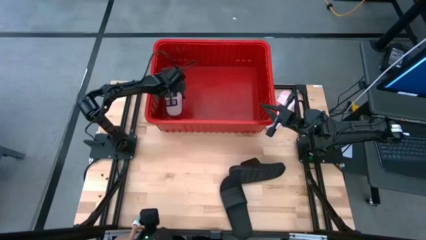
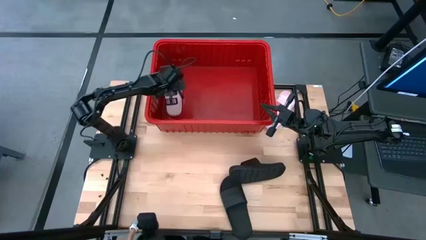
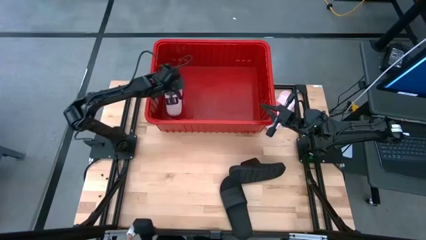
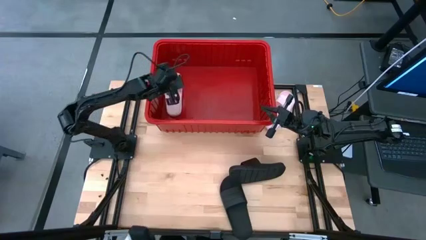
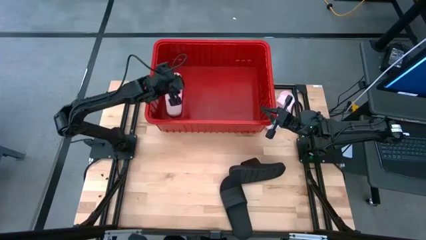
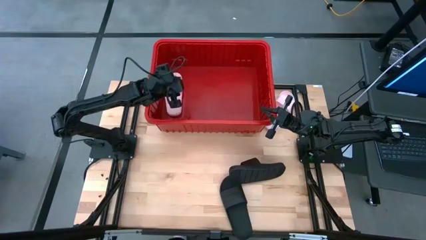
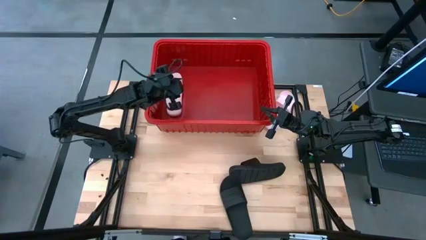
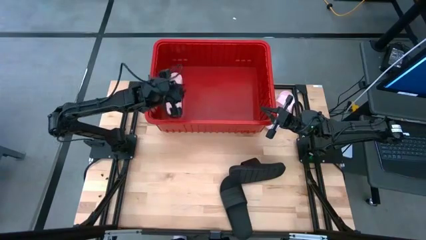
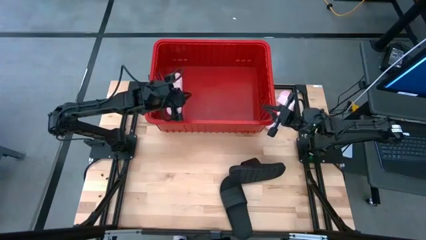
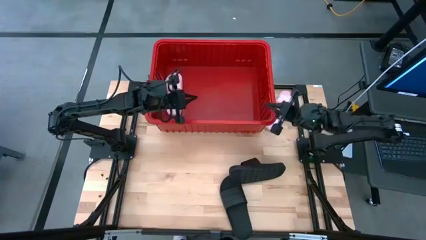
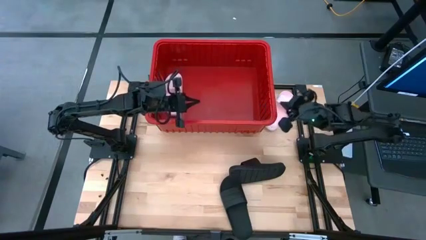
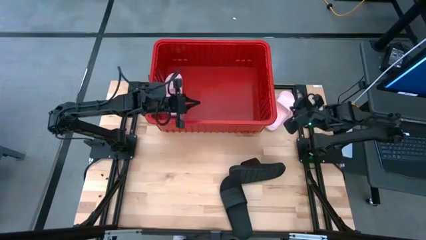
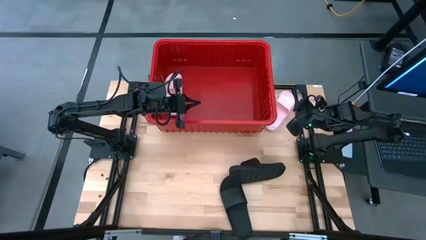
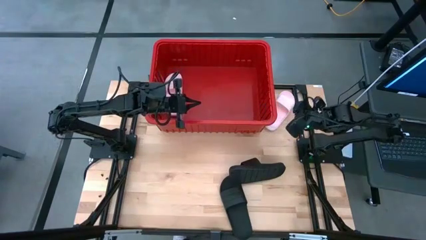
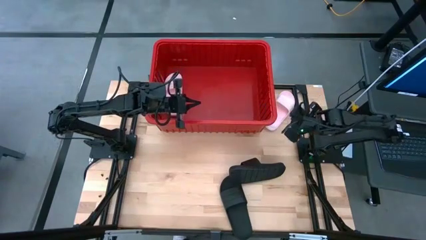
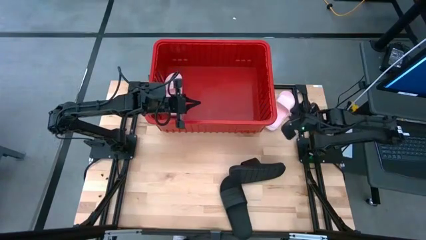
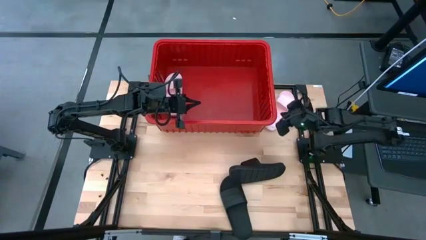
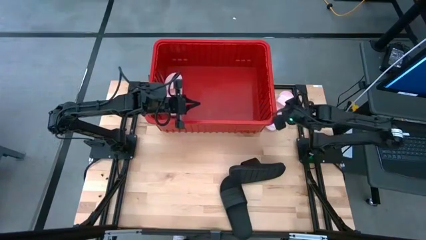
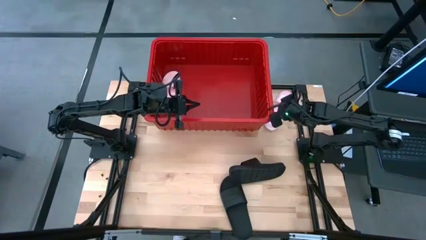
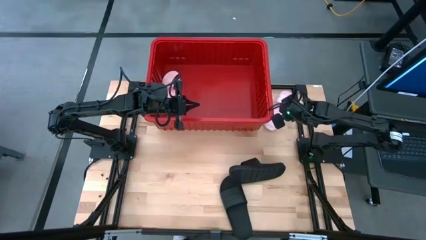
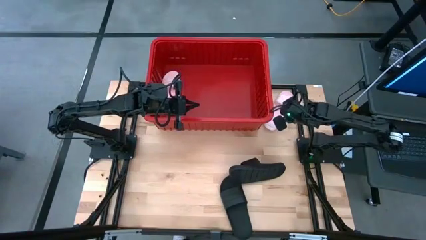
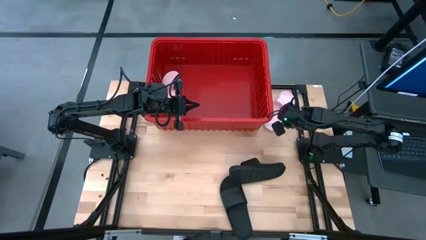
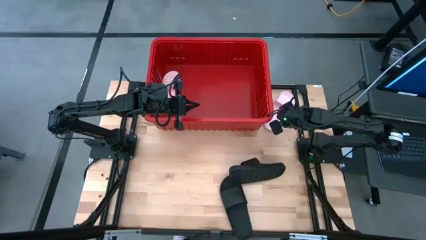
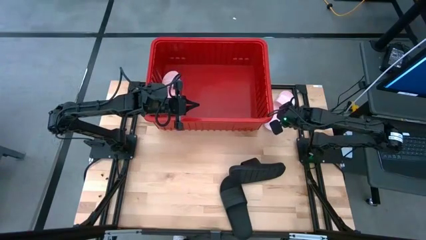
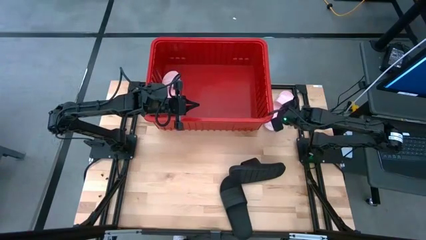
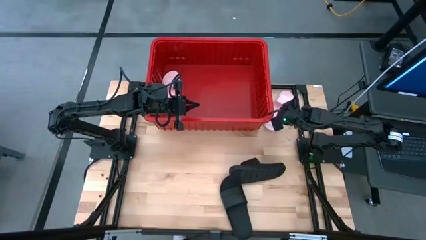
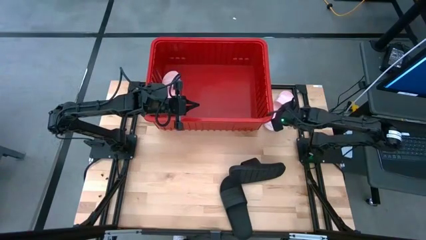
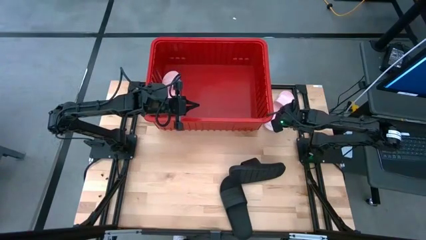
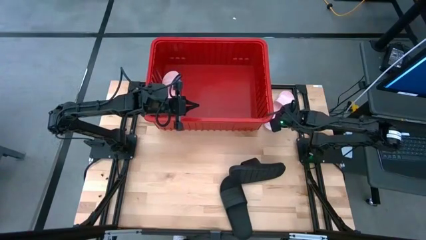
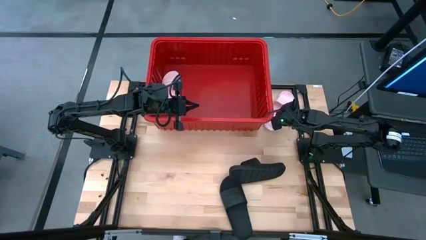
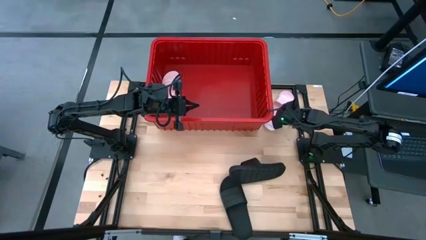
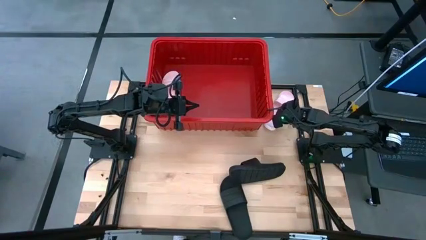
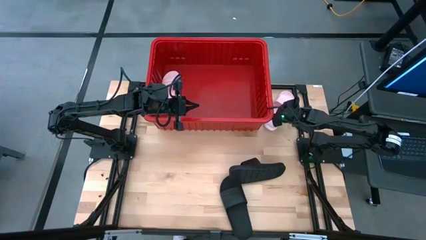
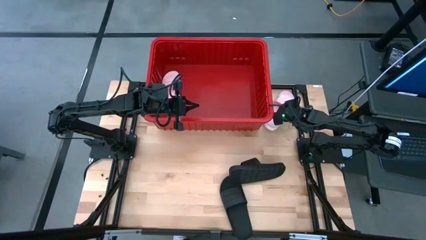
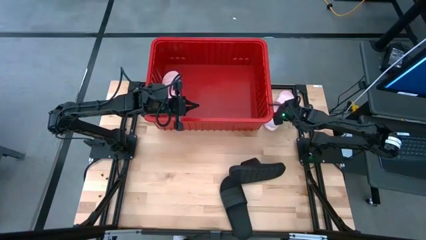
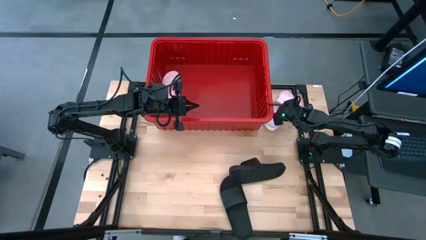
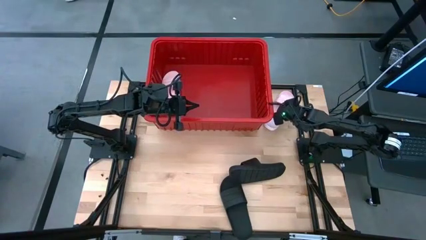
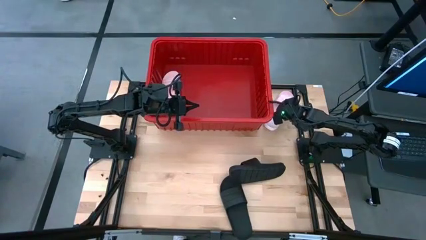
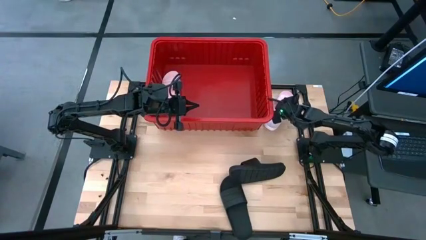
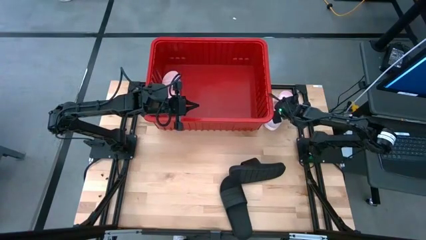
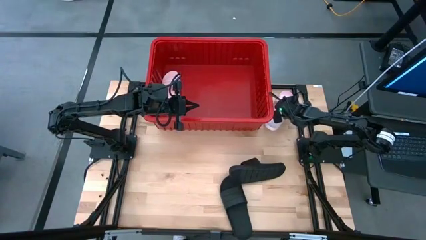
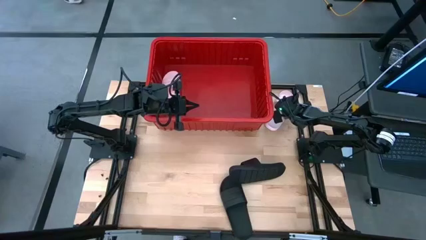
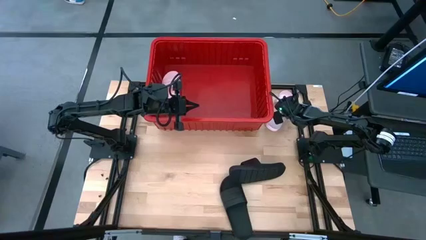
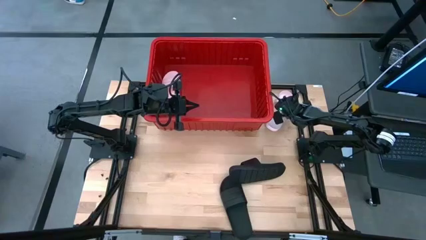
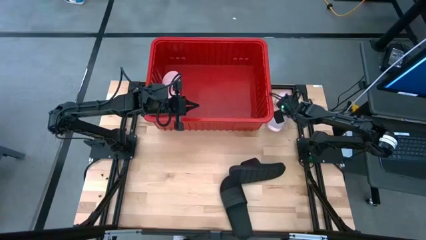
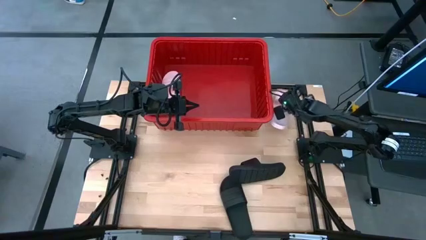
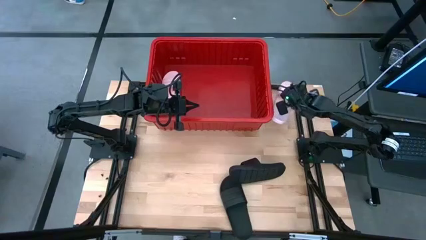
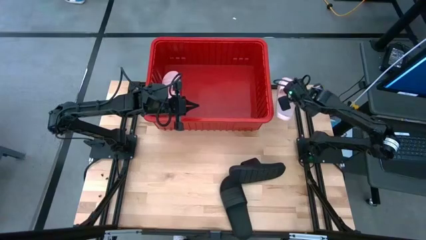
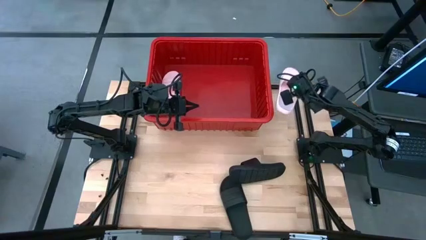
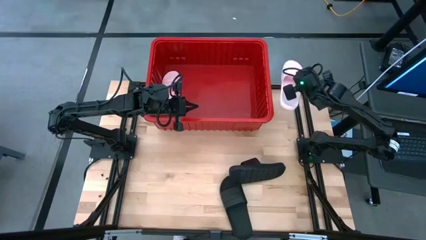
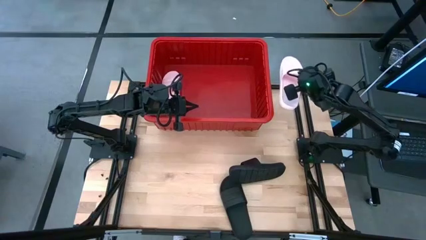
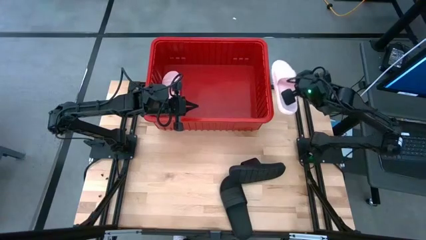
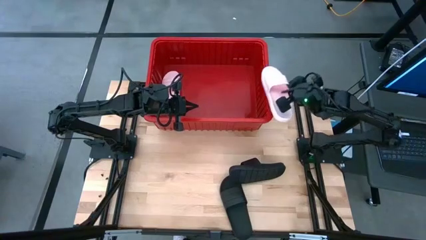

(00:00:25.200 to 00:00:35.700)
Task: Pick and place slides into bin
Put the pink slides into the red bin

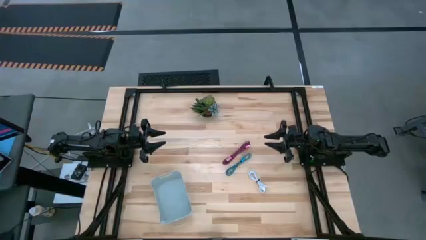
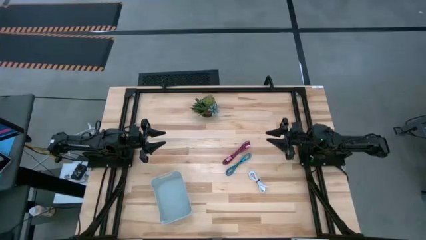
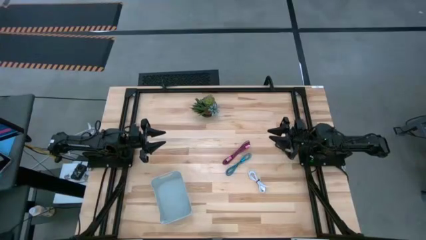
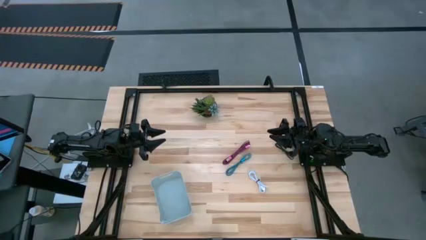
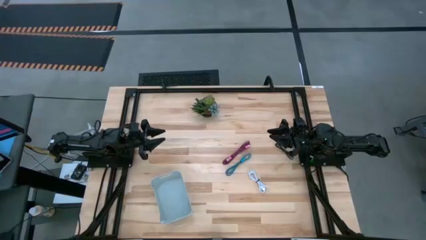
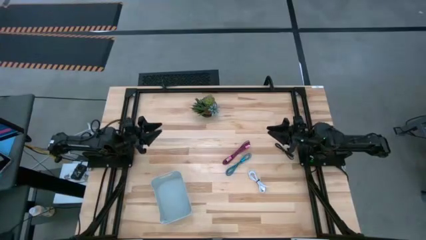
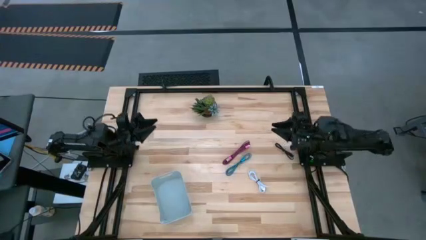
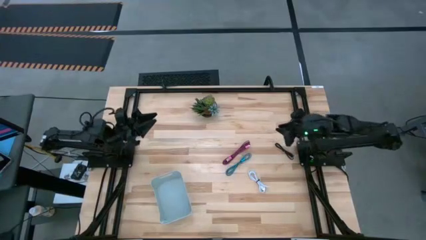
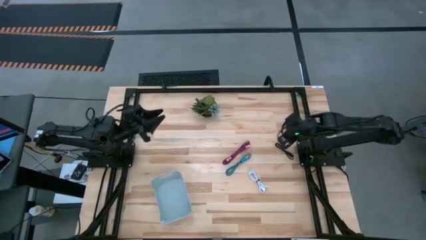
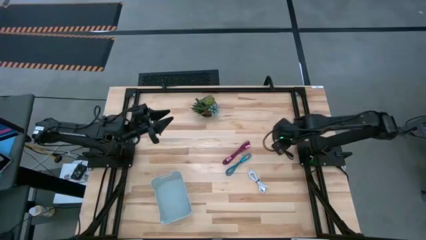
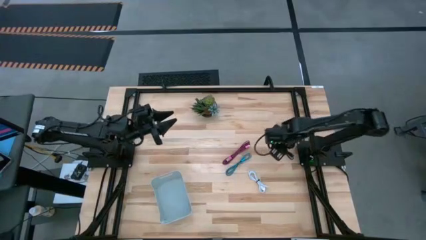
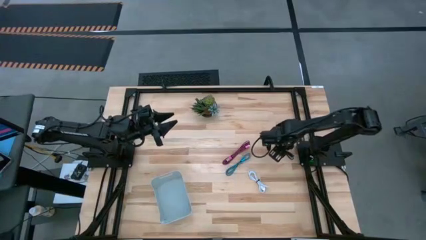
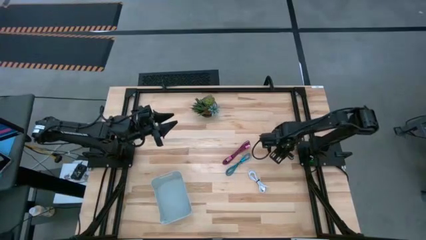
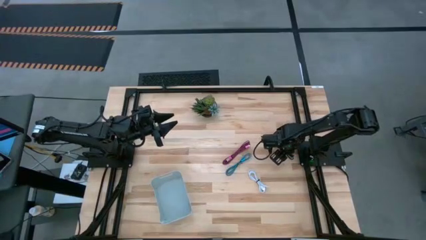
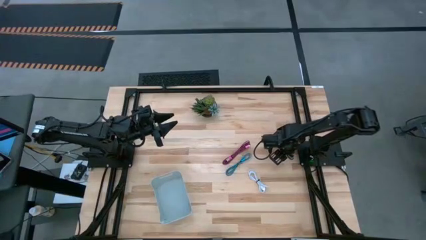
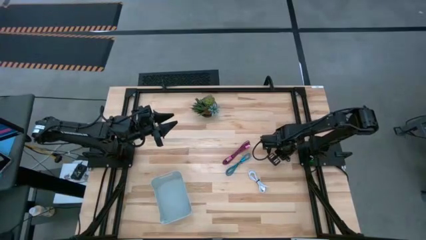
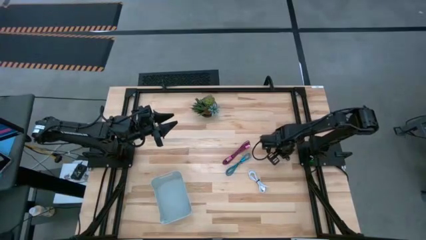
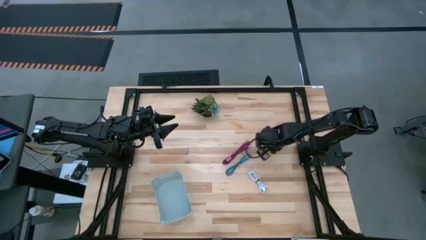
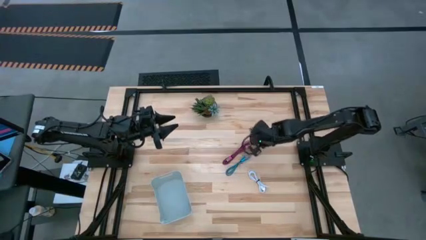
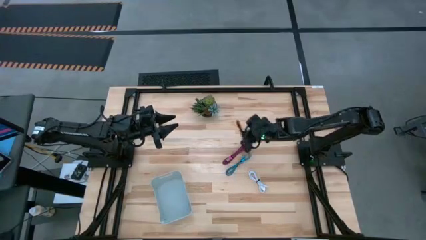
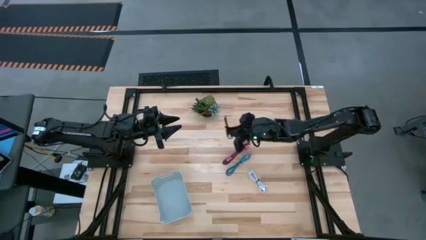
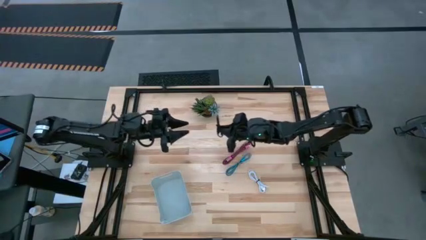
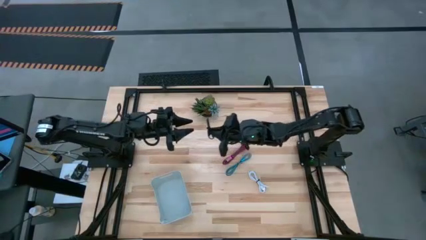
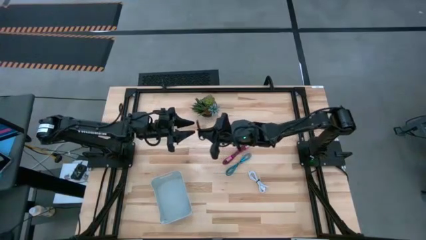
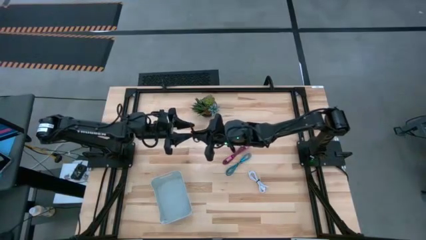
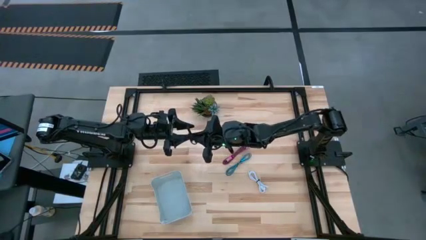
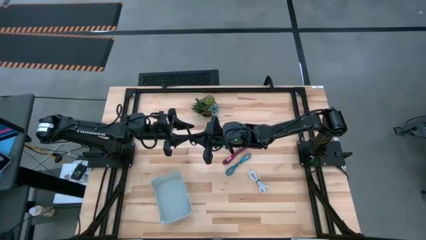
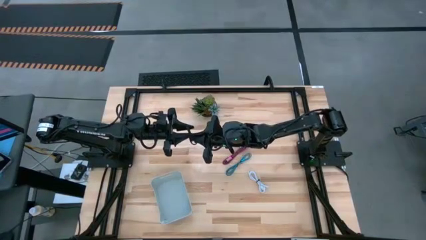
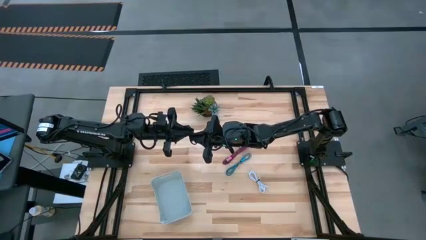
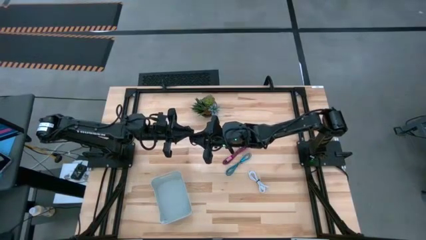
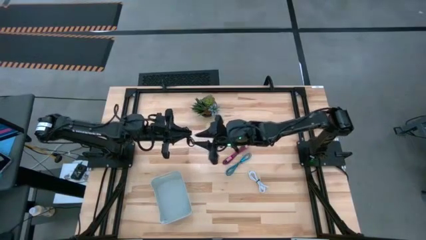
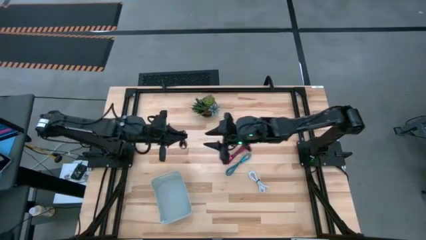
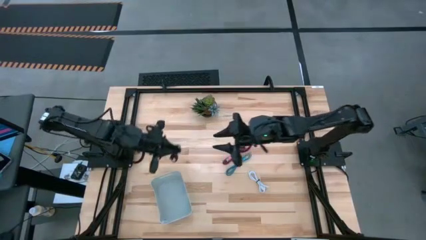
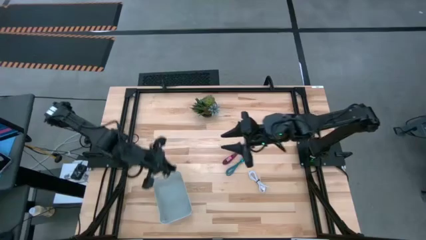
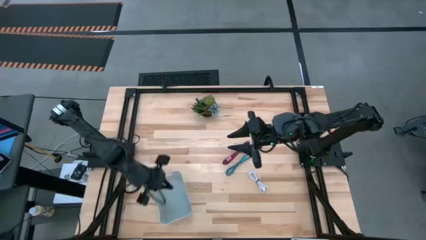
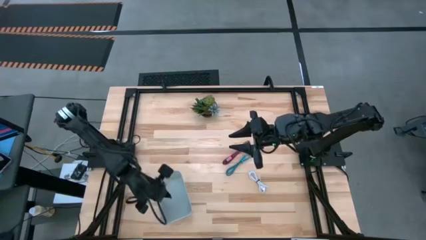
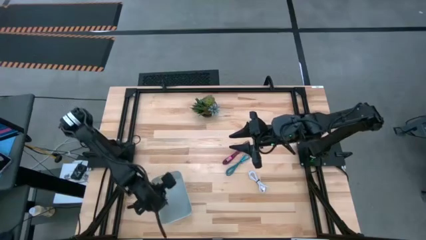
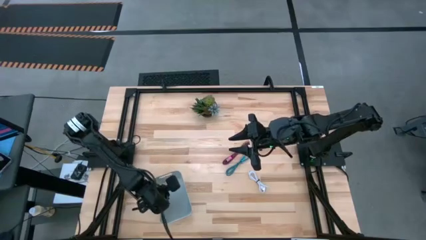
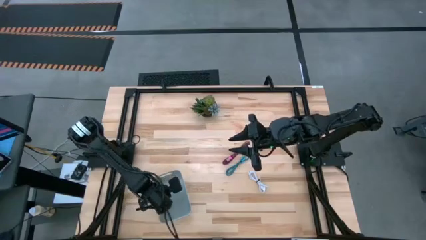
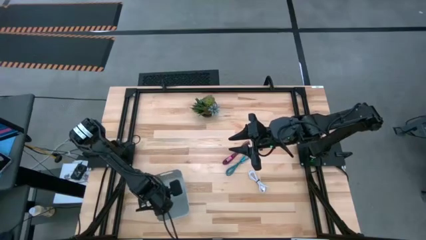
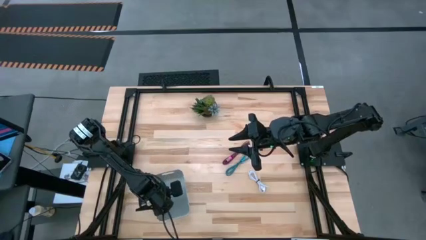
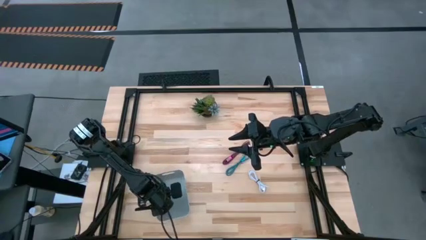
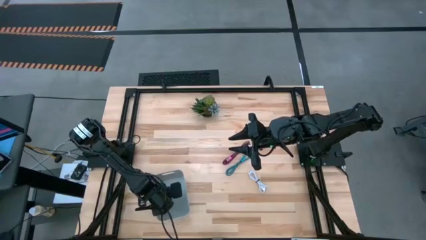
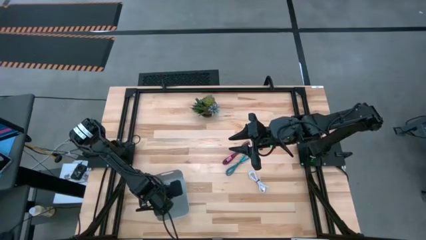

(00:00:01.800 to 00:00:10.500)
Task: Pick and place USB-C Cables
Put the black USB cable into the gray bin
